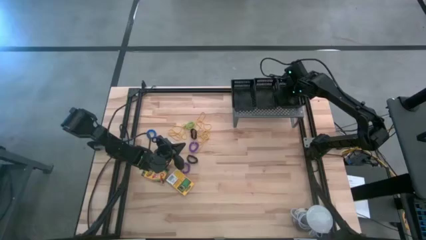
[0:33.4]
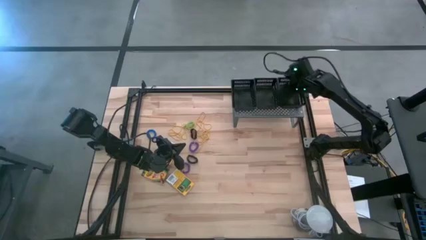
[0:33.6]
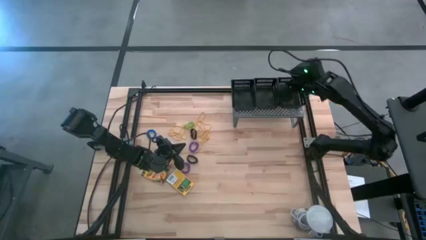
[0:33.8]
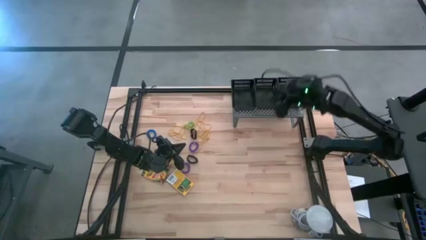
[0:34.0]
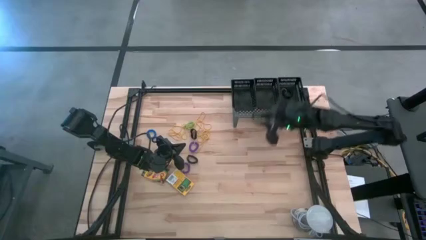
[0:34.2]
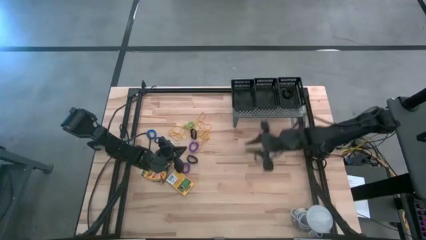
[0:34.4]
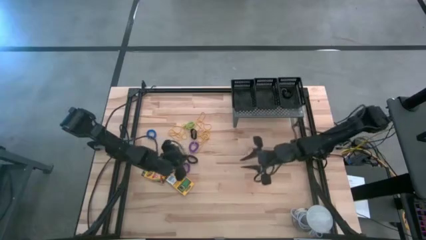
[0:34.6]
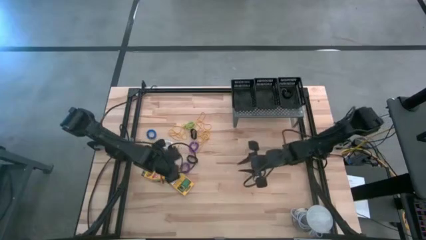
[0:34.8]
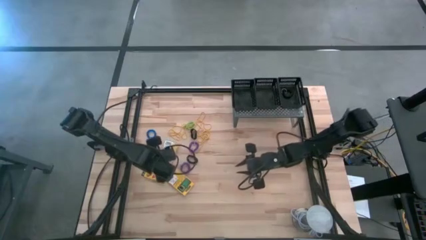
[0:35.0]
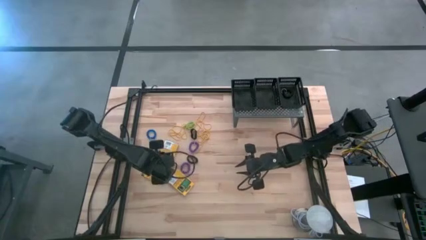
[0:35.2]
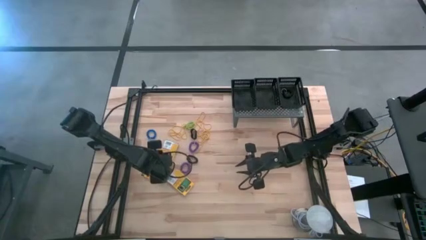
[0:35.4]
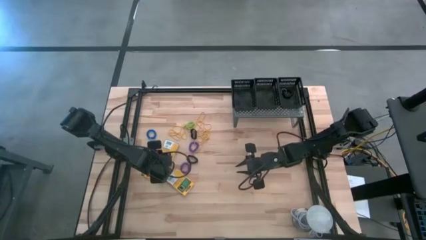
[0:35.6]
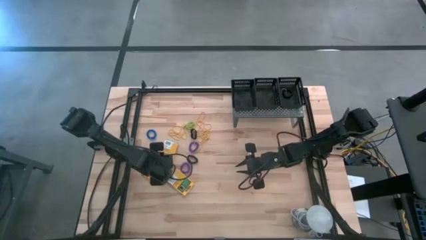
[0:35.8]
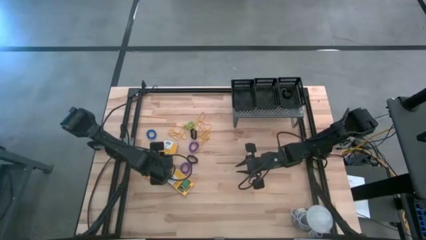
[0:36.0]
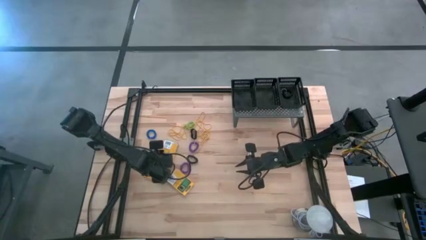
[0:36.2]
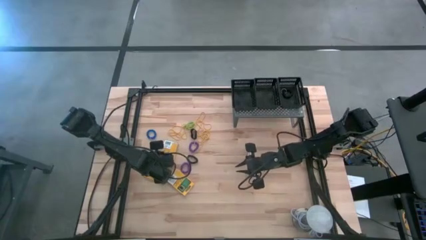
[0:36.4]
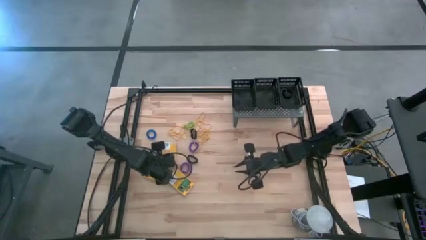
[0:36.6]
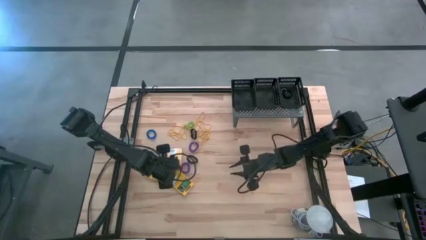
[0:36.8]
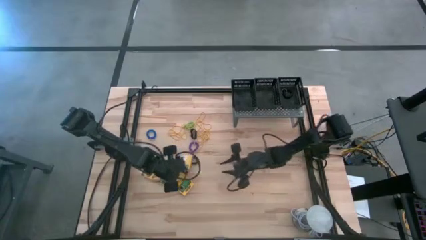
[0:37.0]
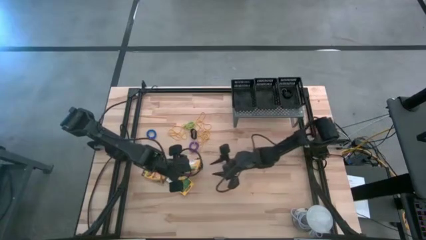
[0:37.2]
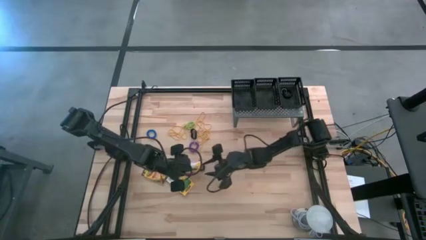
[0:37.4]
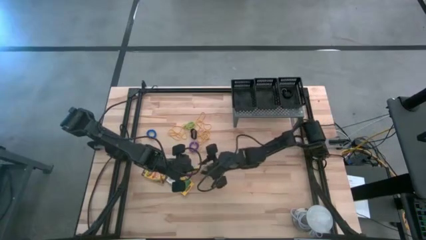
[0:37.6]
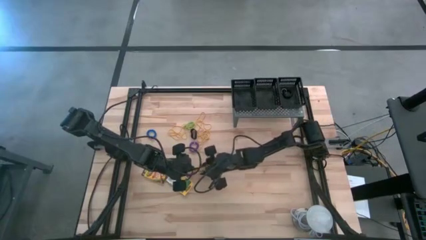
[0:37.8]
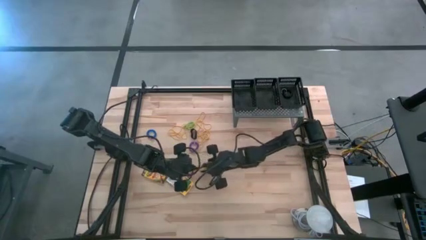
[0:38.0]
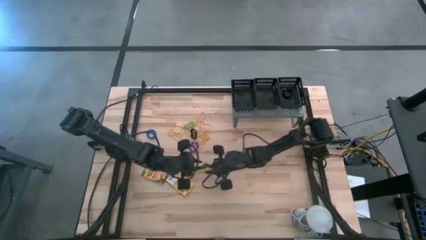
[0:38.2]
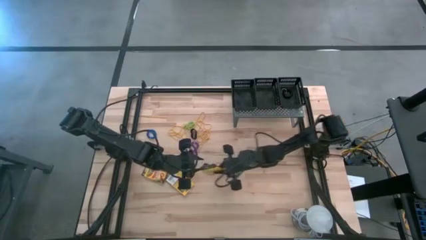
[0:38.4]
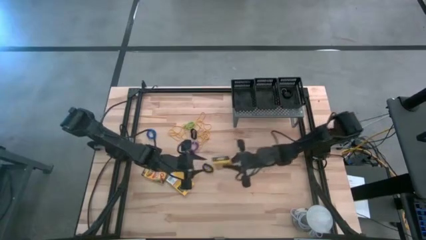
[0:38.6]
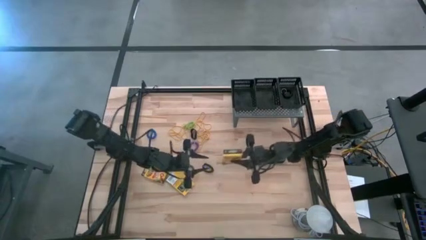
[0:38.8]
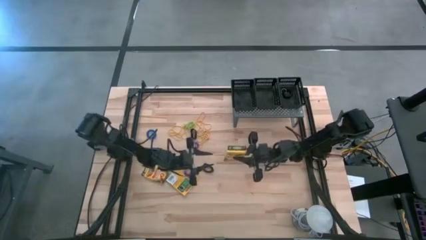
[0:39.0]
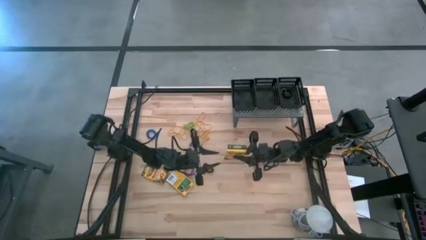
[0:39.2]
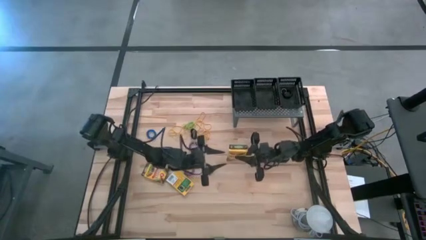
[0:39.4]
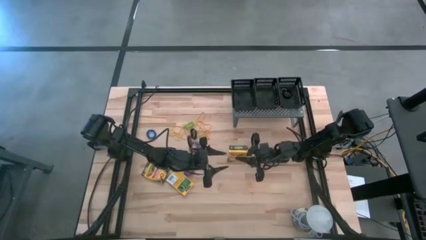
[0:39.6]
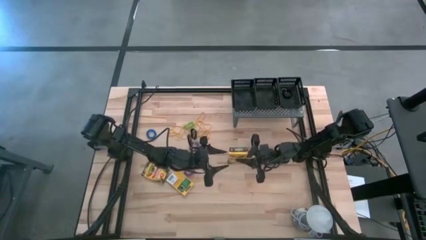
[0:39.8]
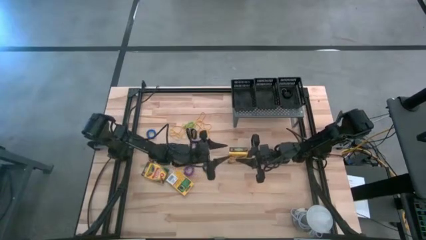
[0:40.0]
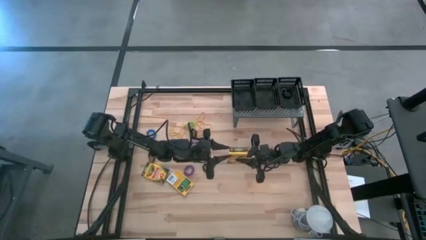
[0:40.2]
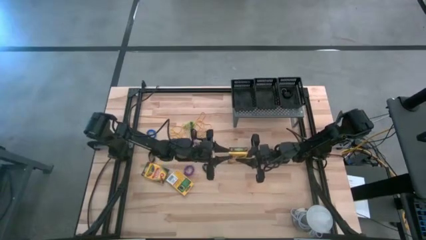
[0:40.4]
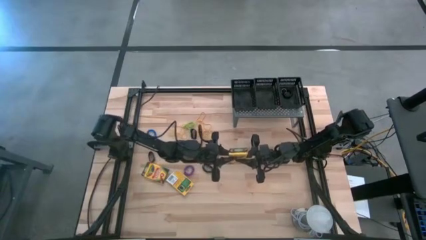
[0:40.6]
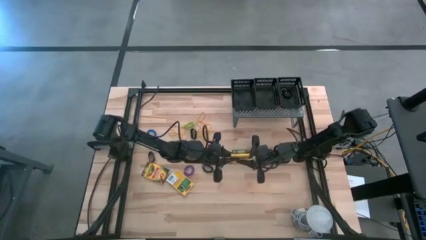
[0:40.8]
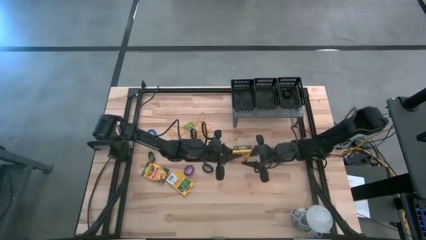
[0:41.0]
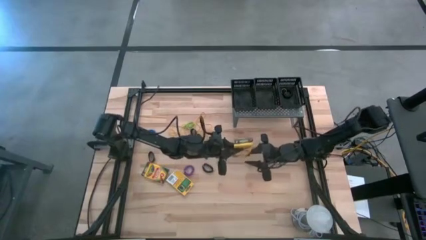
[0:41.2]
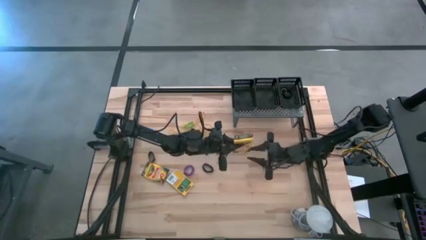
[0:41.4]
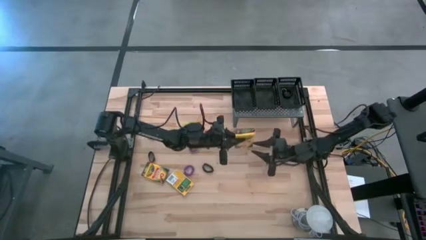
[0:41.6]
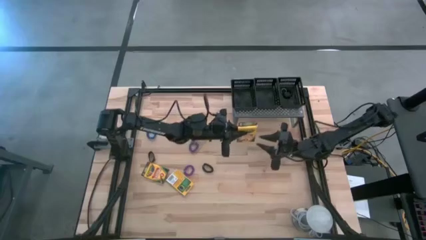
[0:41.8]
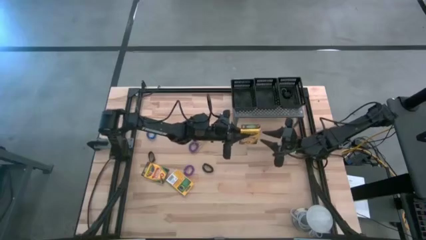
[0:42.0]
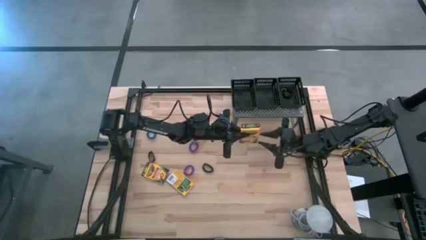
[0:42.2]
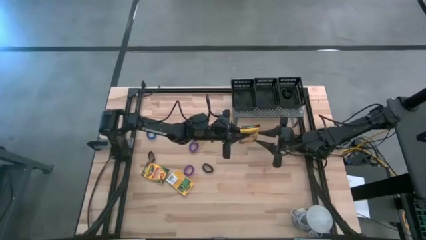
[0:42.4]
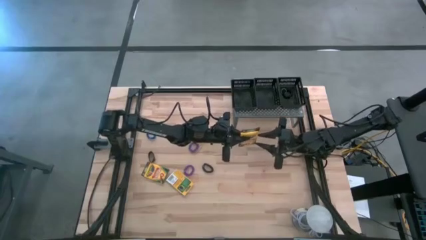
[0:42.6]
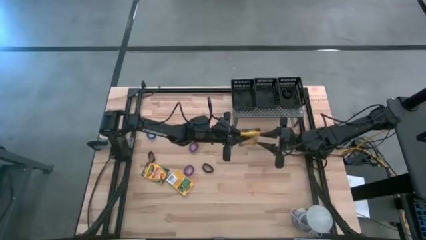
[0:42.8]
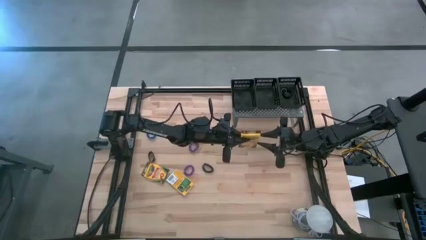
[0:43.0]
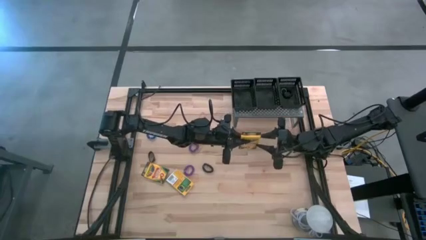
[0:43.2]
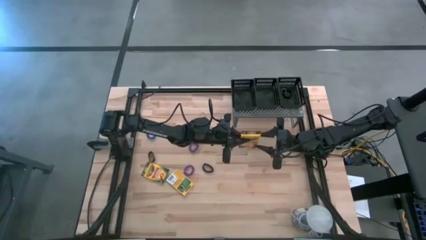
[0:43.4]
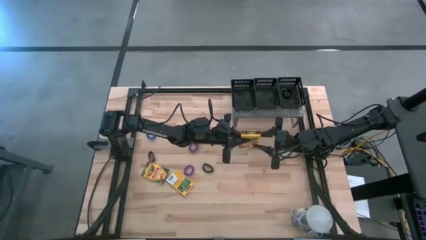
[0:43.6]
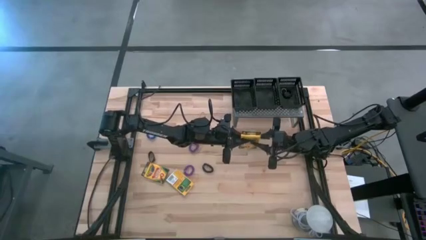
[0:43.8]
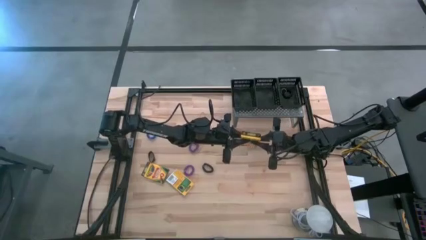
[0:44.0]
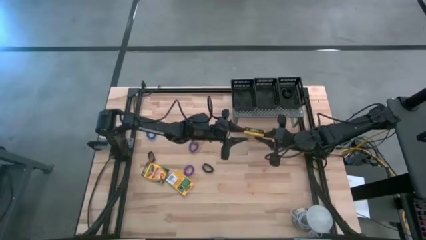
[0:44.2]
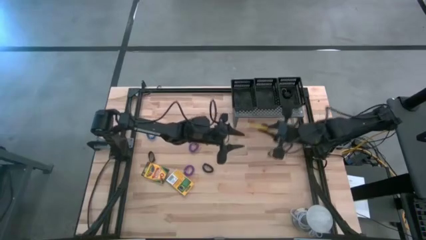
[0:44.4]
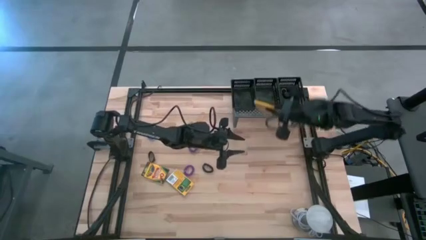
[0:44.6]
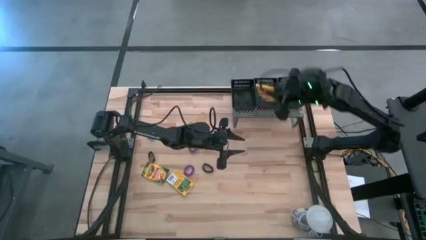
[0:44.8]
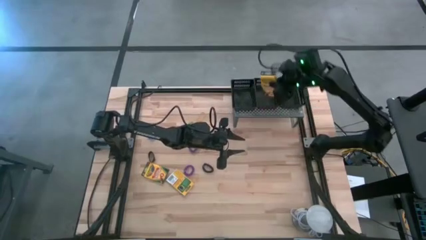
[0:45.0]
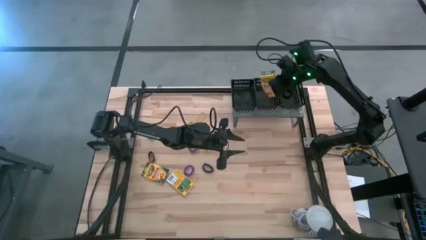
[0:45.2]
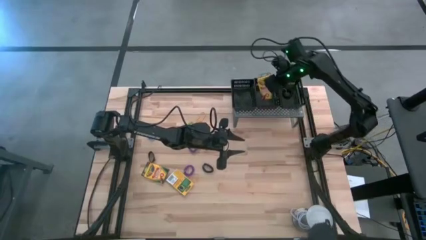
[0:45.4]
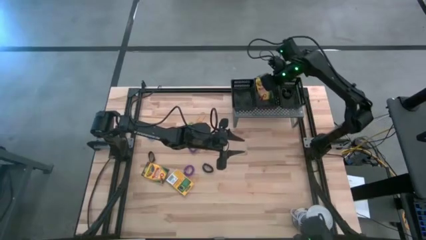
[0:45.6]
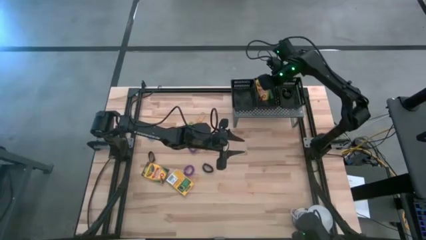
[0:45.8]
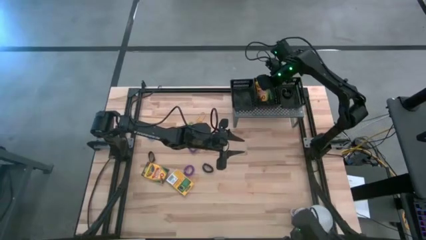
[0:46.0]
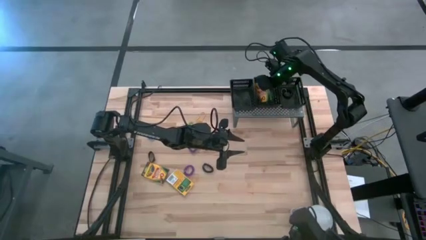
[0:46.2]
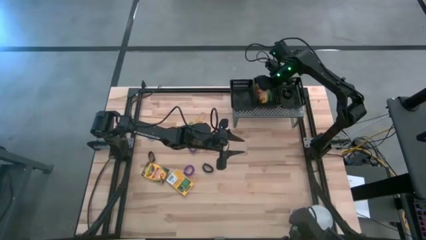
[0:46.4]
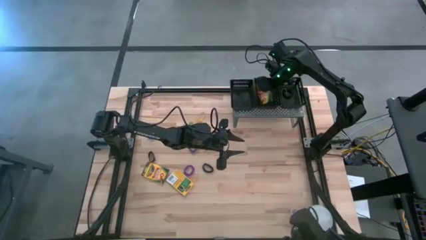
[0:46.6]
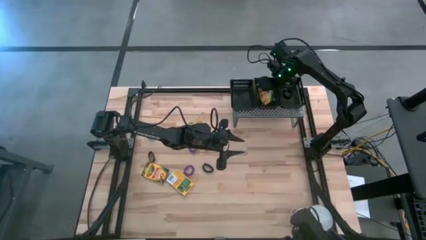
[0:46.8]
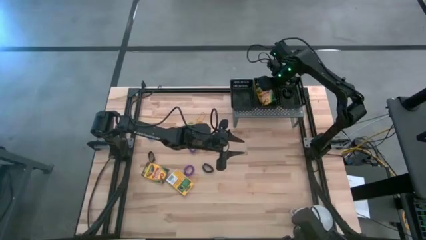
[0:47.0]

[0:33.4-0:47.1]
Task: Pick & Place Office Desk Supplies
Put the yellow crayon box into the middle black basket on the shelf
